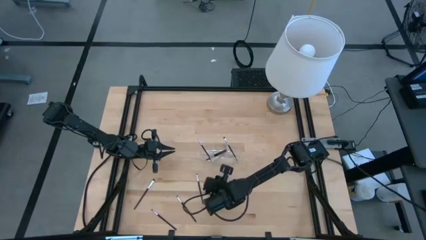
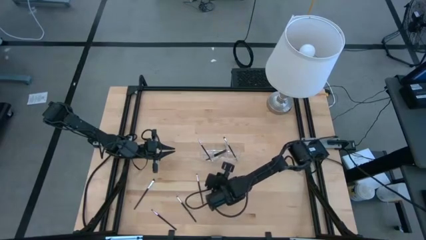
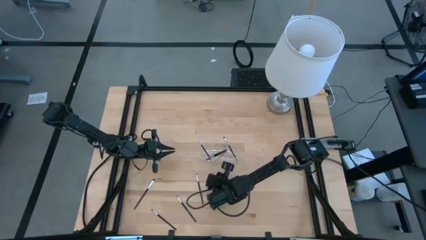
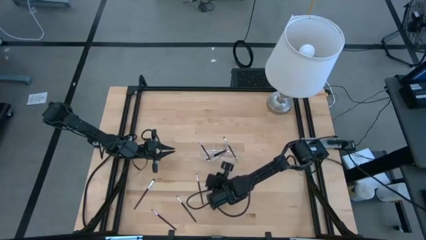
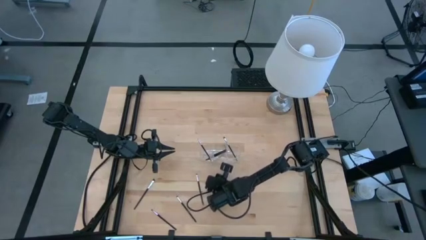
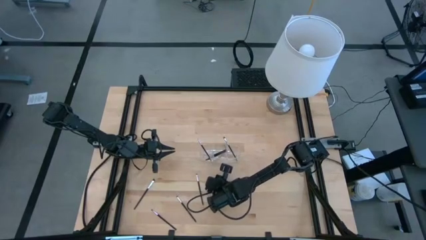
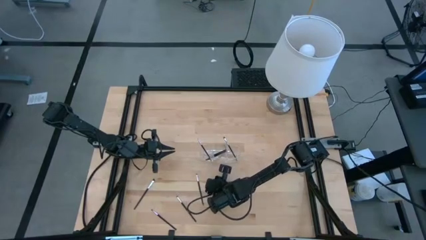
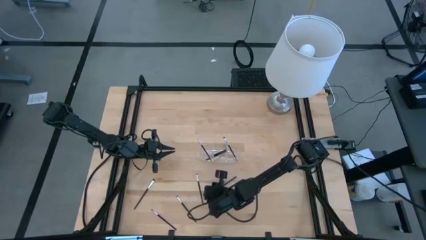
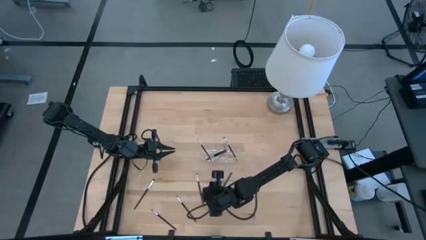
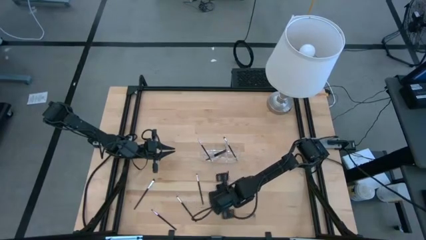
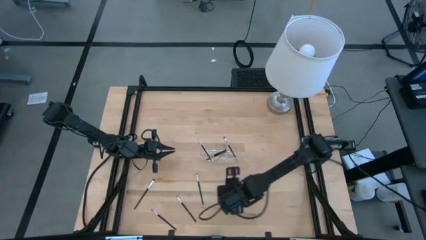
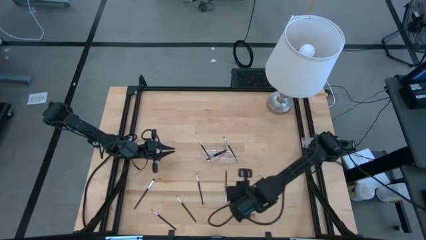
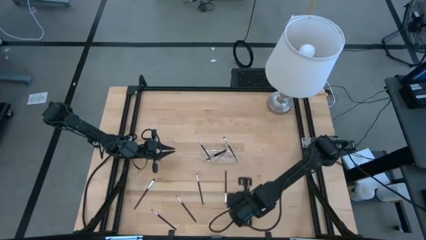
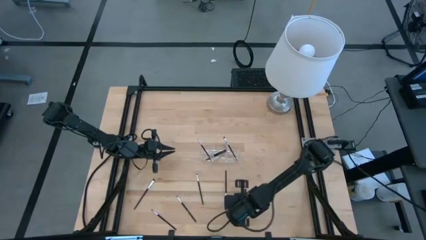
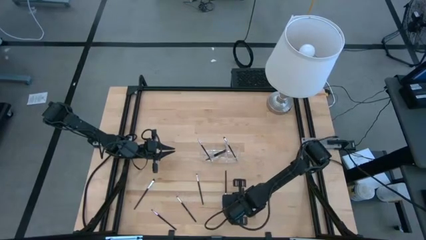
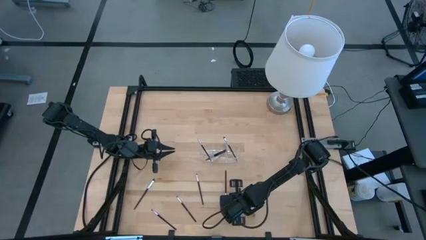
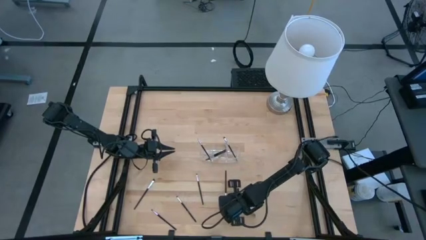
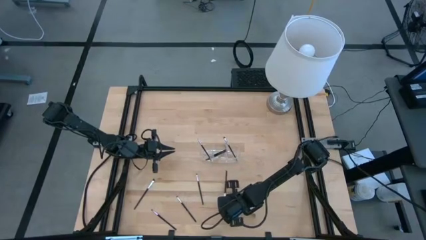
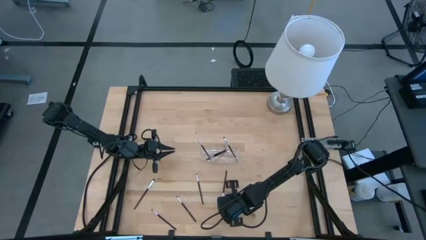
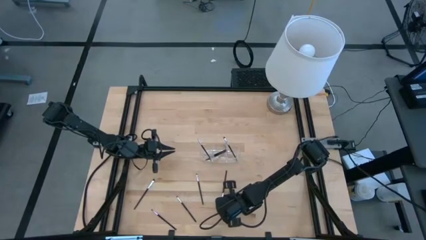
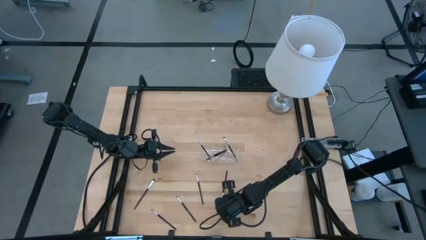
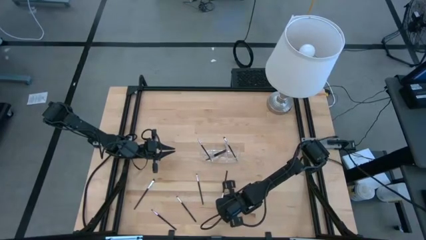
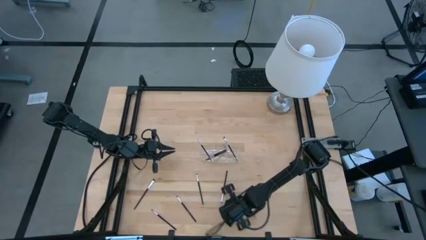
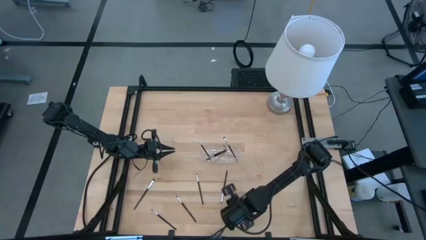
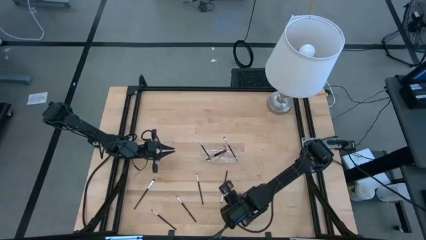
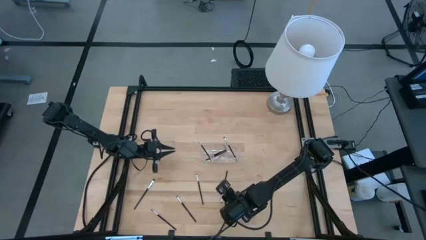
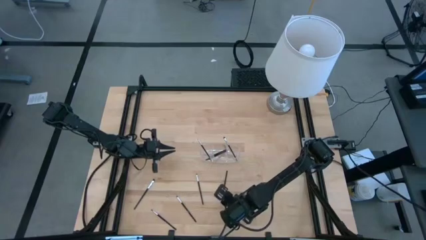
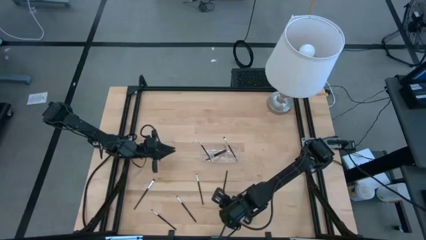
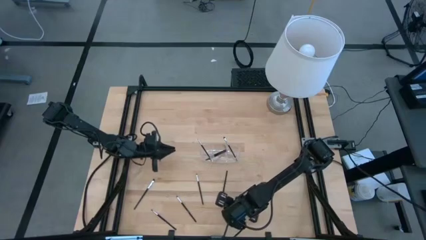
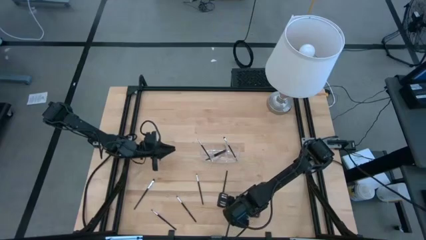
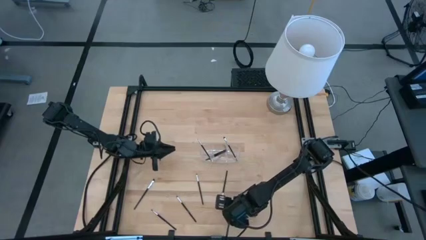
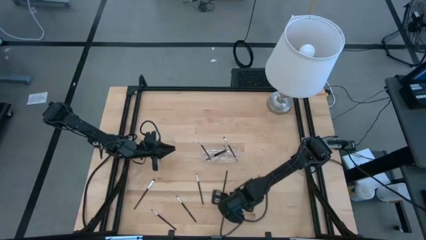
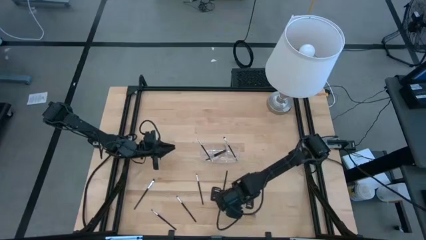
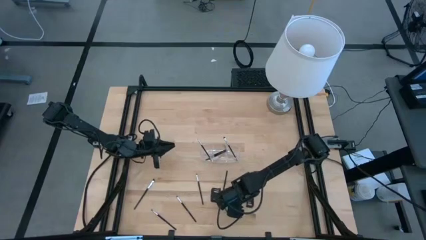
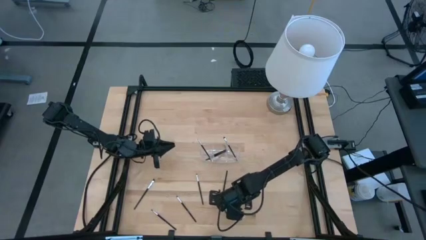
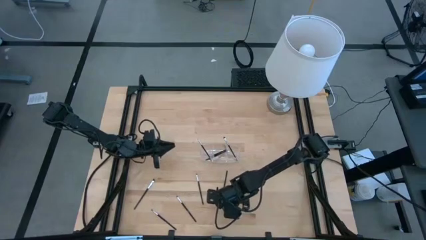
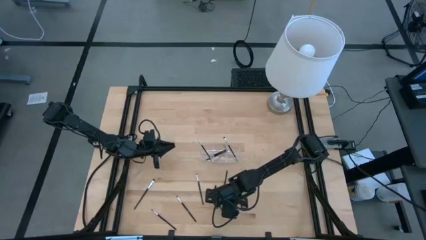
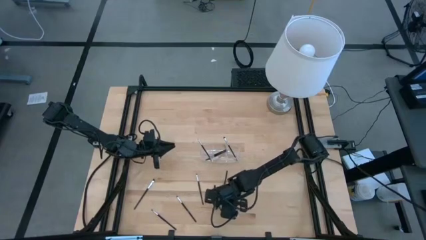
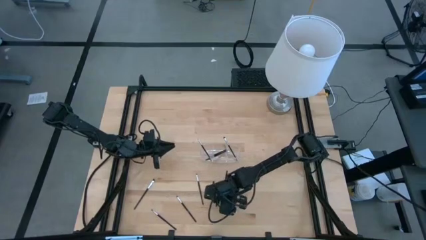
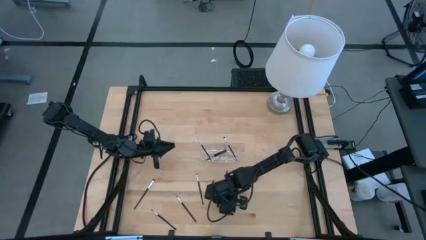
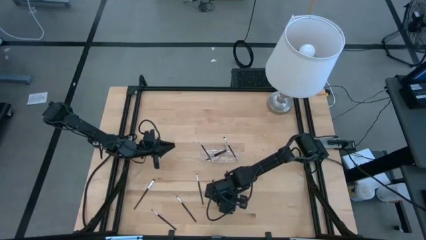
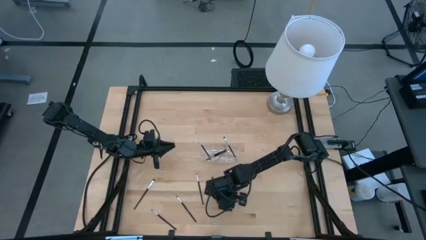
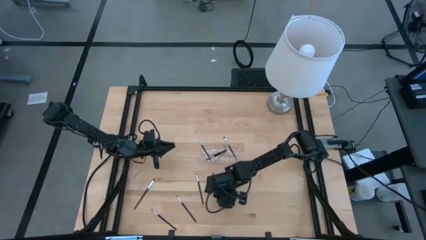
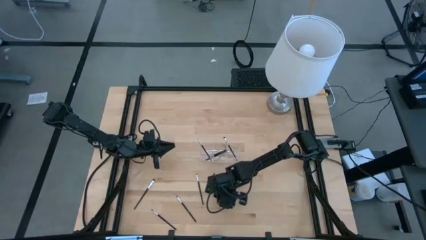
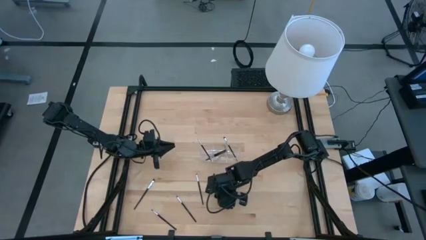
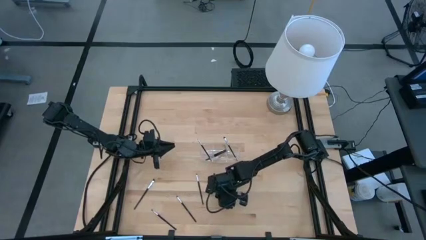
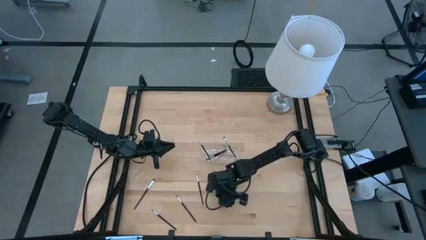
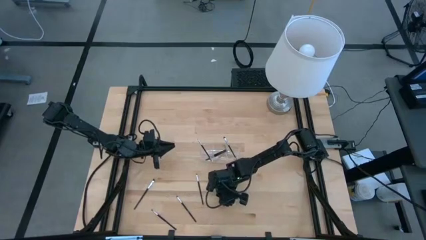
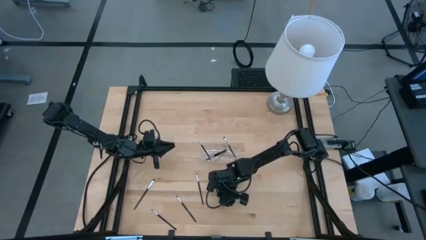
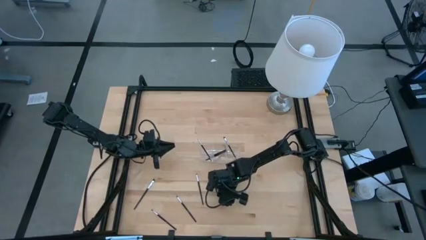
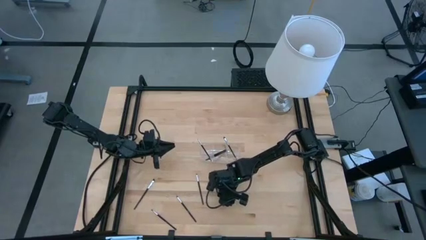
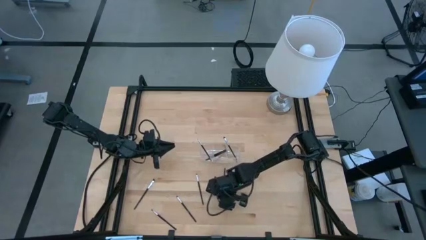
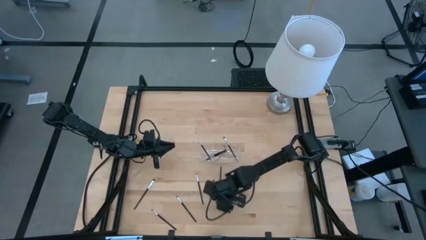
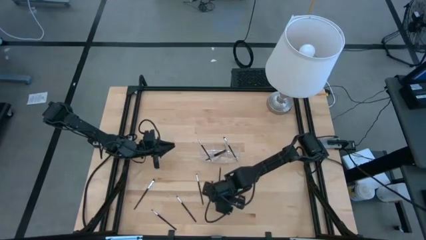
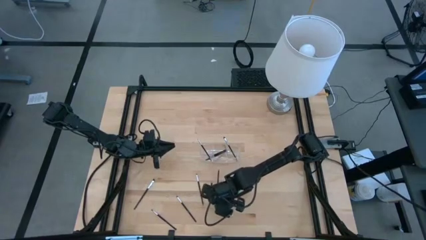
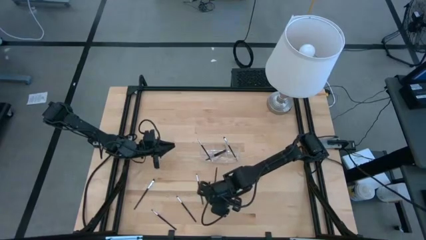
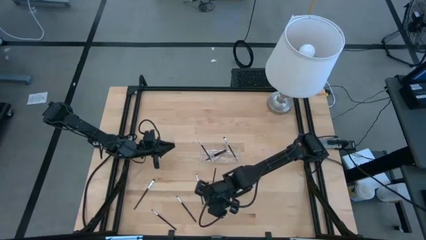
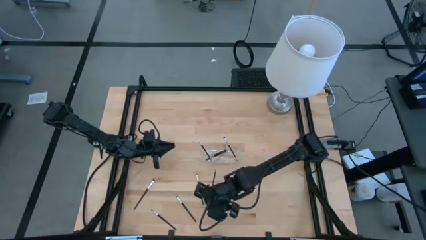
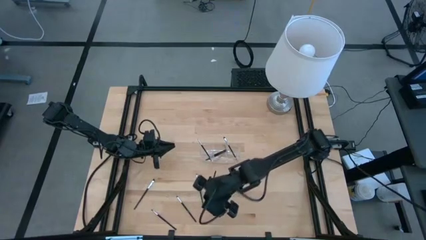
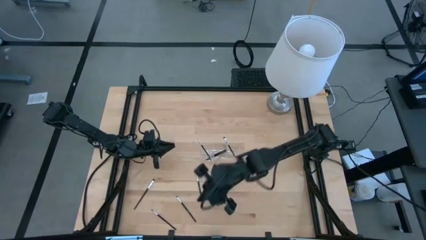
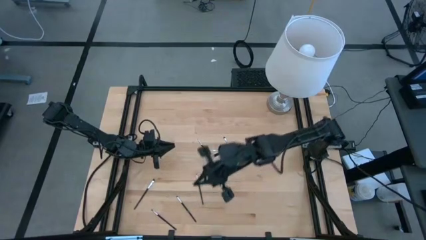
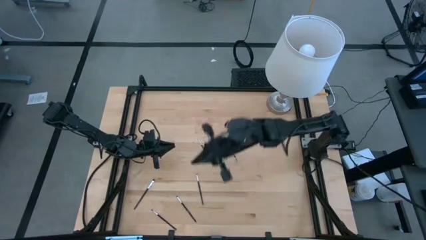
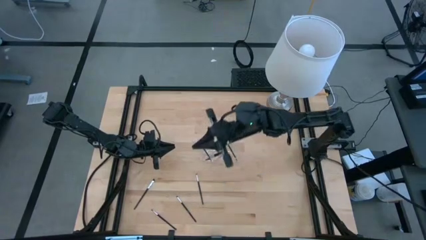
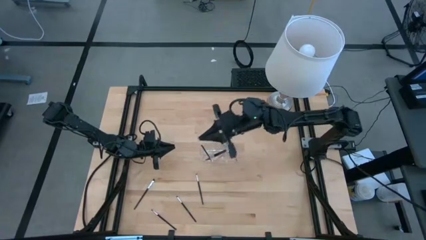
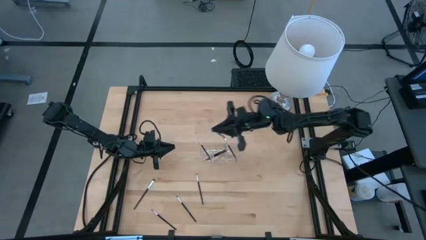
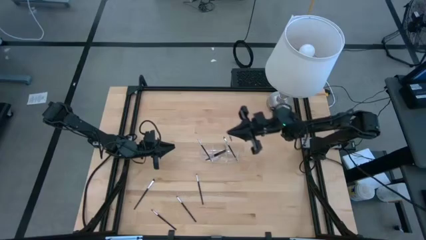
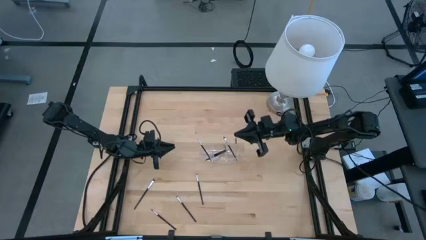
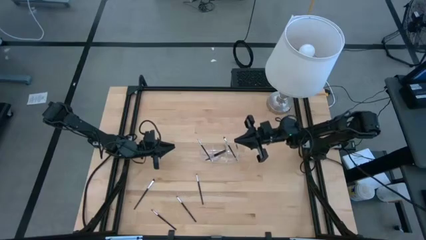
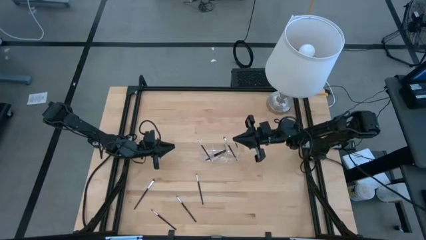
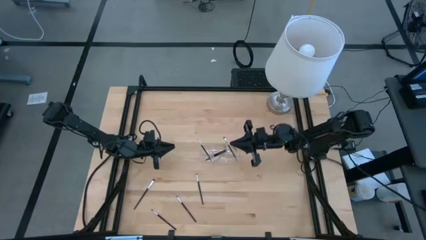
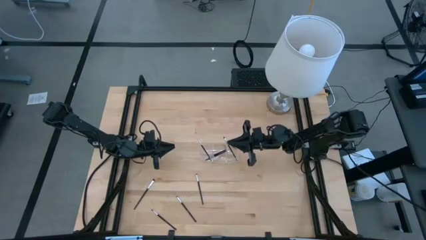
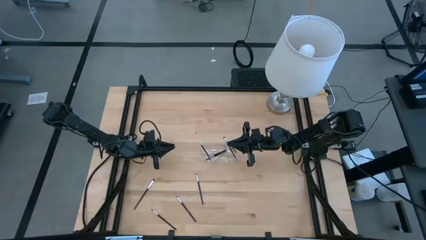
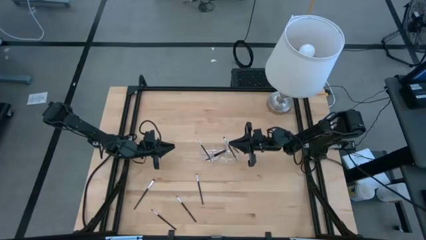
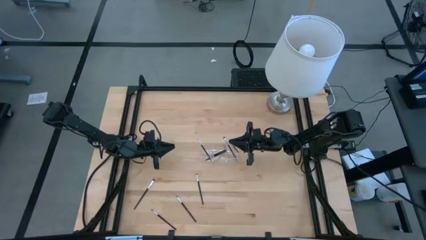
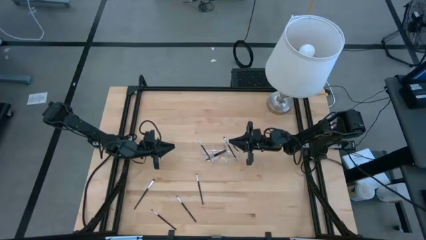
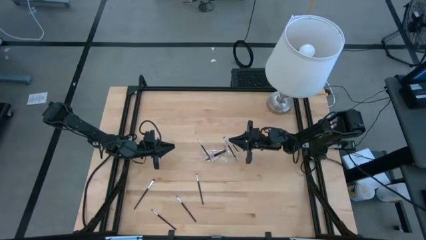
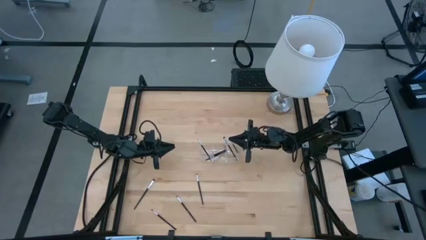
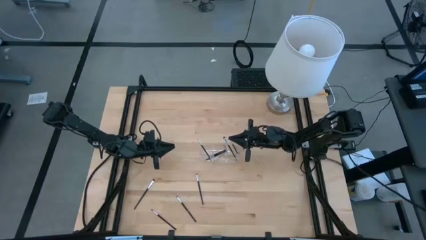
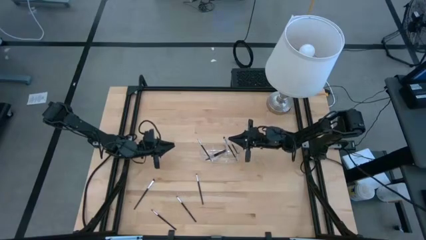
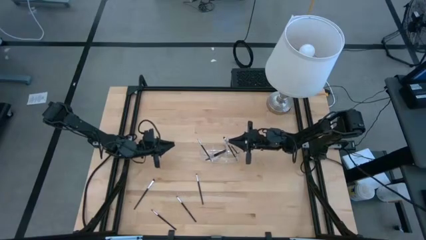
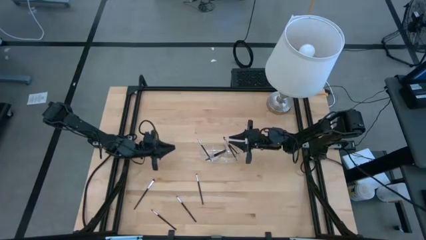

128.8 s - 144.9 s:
Task: Pick & Place Makeup Supplies
Put the makeup brush into the transparent organizer
